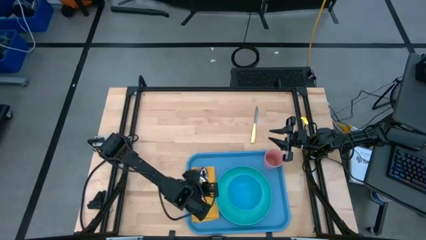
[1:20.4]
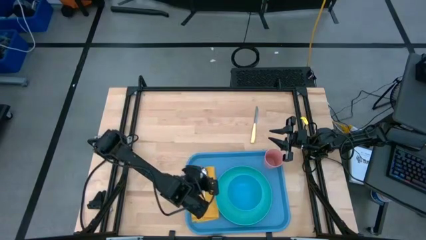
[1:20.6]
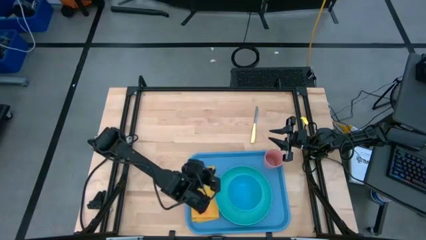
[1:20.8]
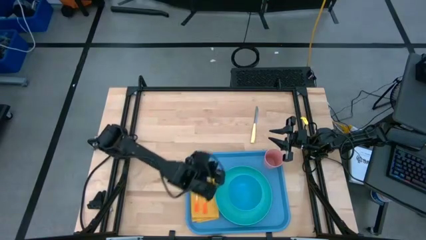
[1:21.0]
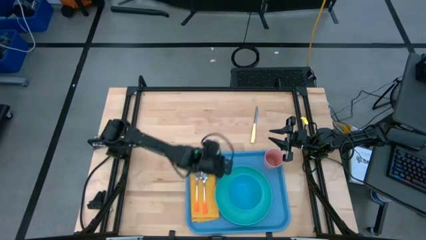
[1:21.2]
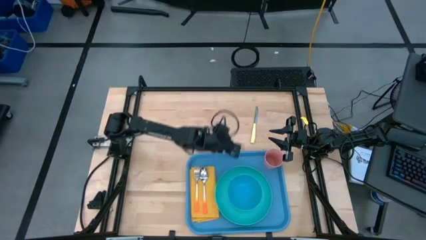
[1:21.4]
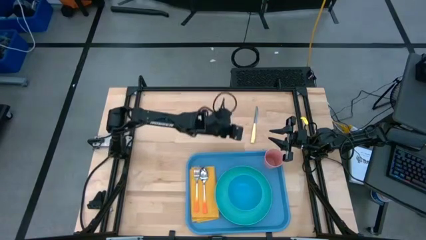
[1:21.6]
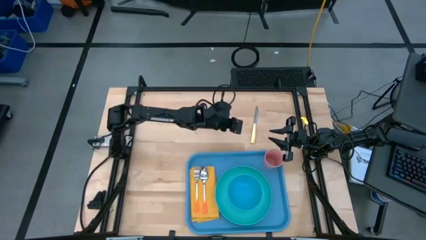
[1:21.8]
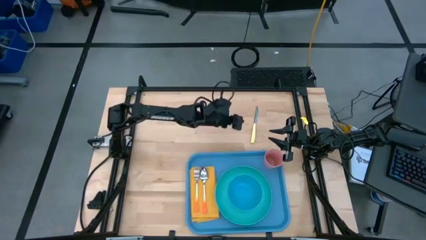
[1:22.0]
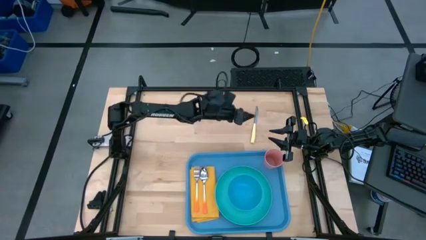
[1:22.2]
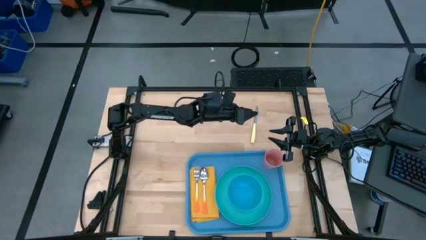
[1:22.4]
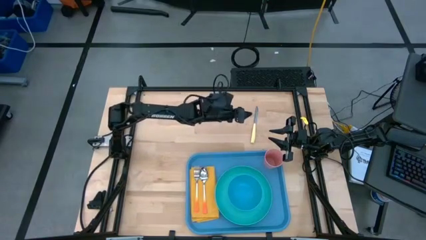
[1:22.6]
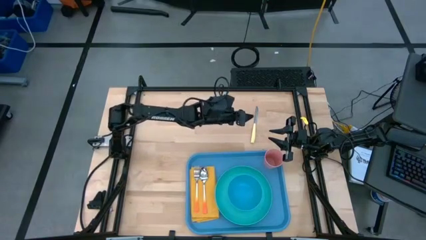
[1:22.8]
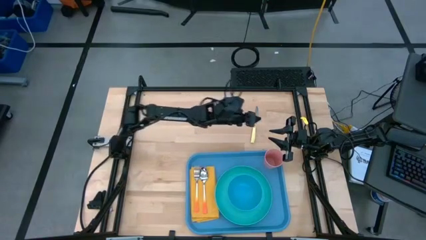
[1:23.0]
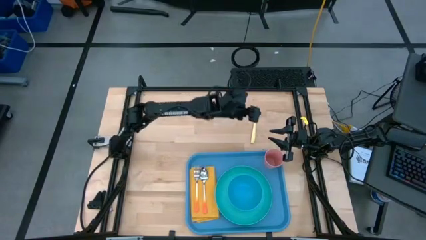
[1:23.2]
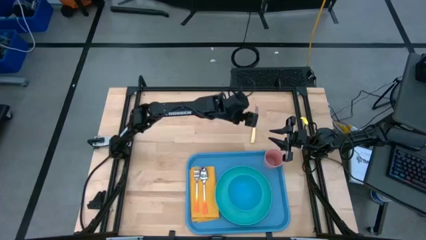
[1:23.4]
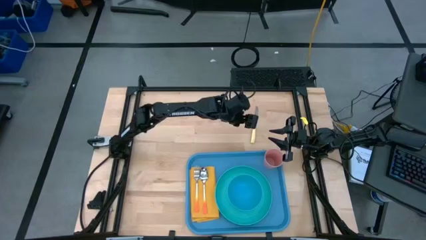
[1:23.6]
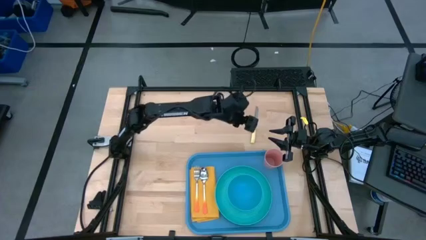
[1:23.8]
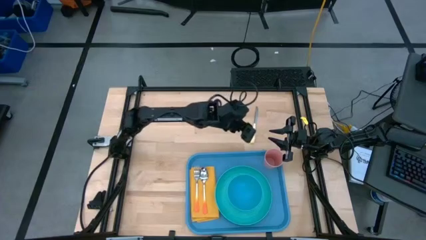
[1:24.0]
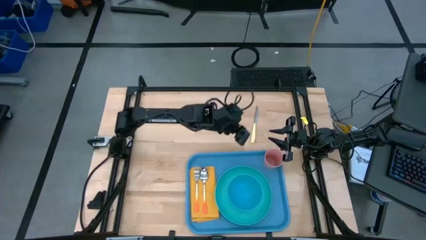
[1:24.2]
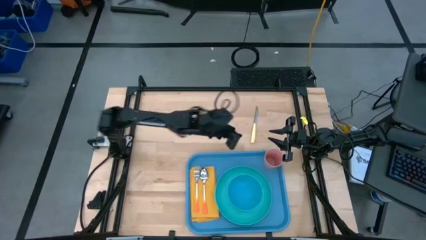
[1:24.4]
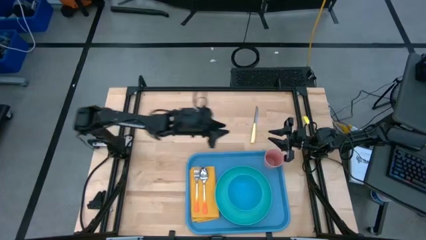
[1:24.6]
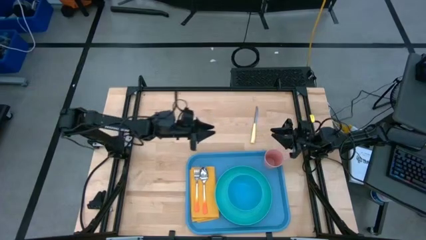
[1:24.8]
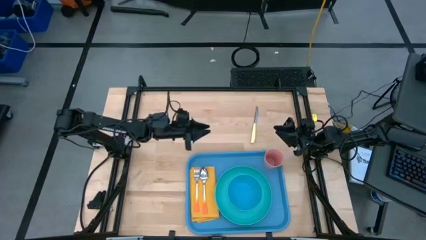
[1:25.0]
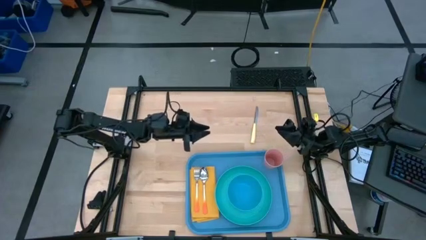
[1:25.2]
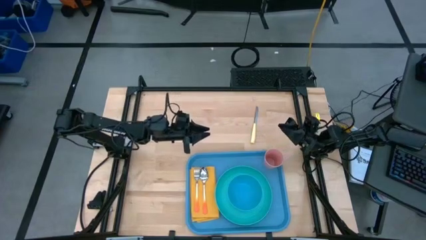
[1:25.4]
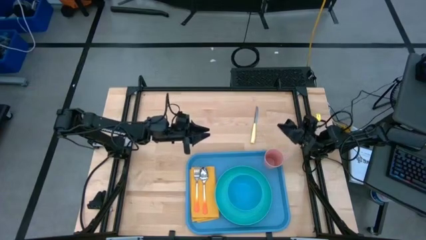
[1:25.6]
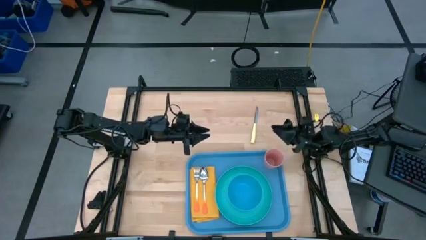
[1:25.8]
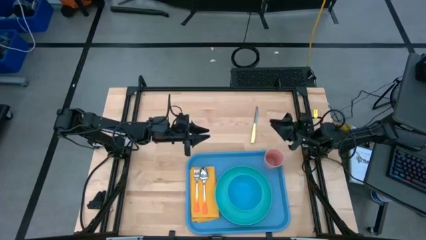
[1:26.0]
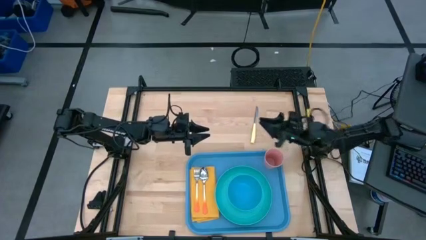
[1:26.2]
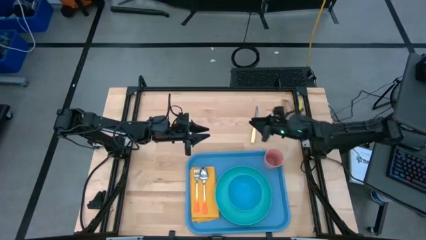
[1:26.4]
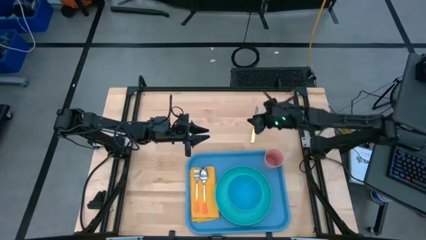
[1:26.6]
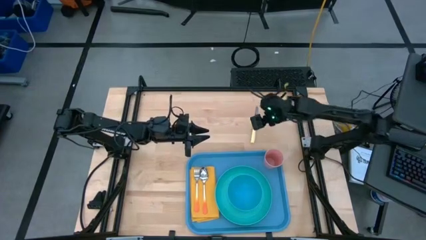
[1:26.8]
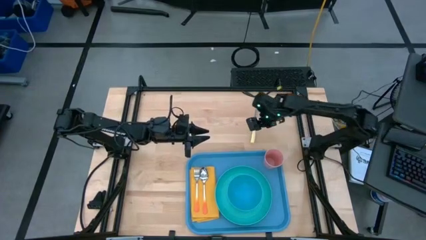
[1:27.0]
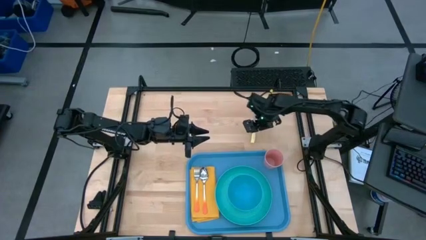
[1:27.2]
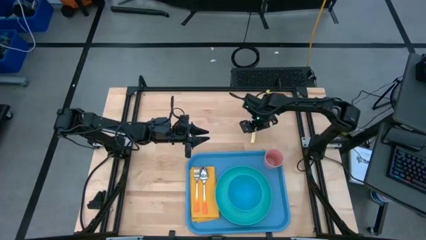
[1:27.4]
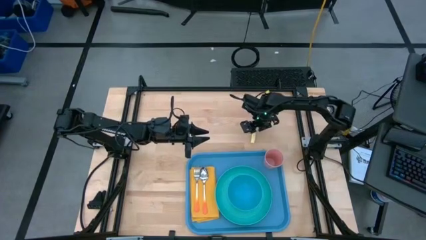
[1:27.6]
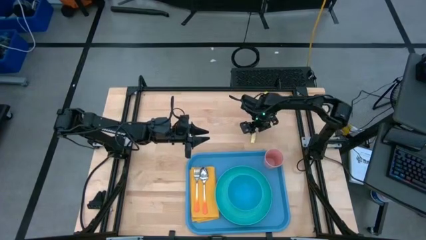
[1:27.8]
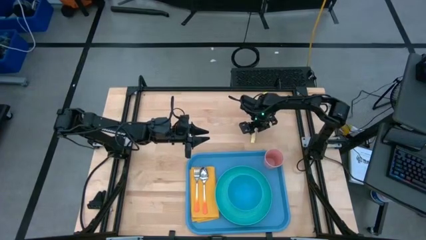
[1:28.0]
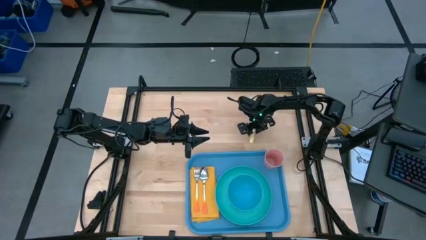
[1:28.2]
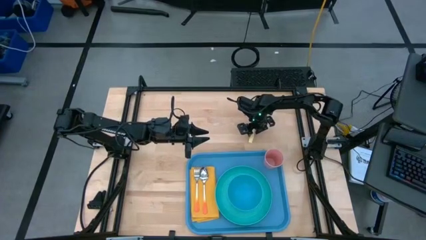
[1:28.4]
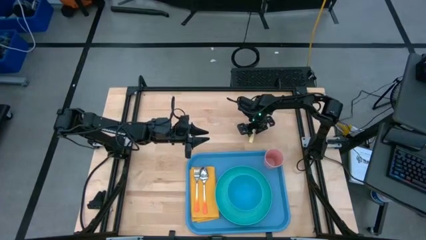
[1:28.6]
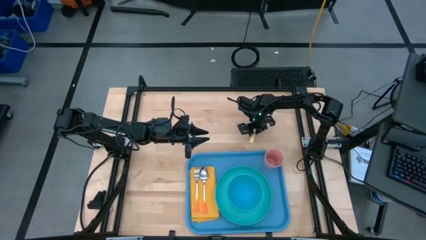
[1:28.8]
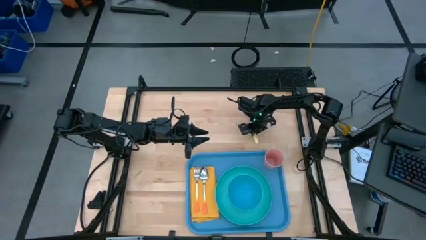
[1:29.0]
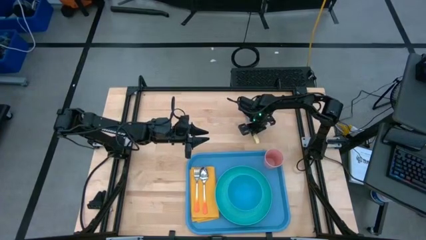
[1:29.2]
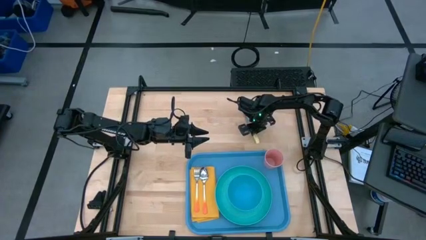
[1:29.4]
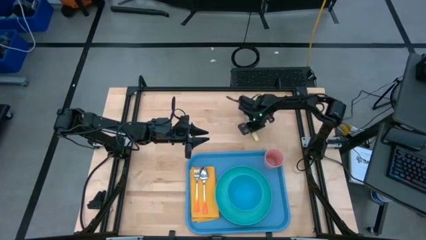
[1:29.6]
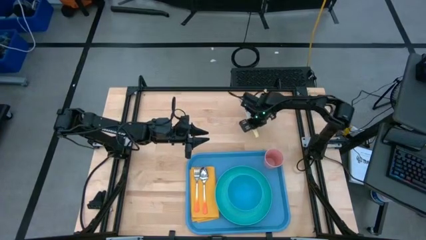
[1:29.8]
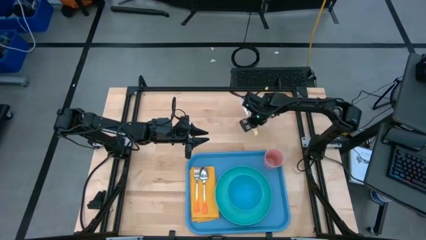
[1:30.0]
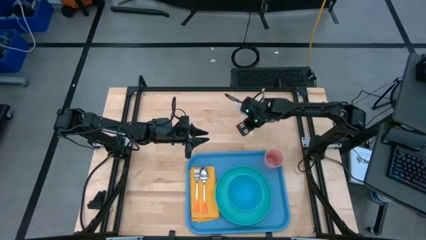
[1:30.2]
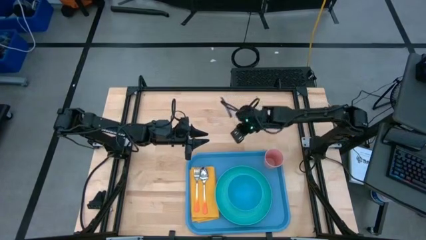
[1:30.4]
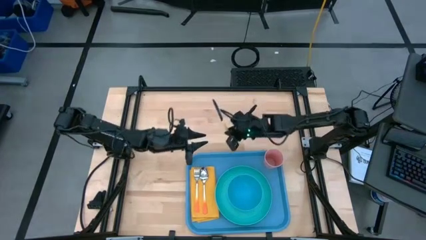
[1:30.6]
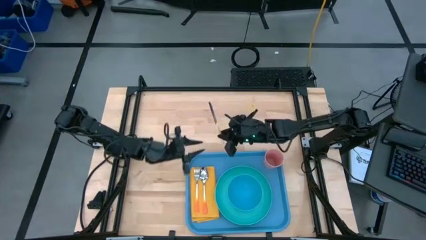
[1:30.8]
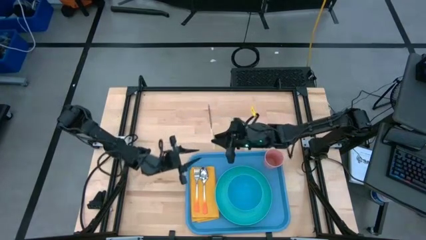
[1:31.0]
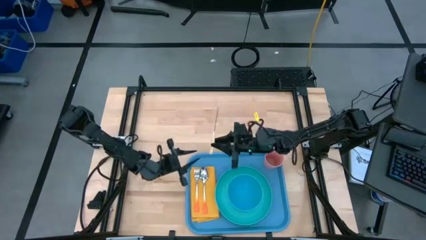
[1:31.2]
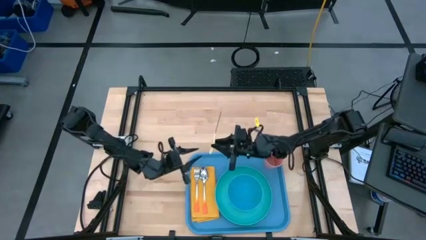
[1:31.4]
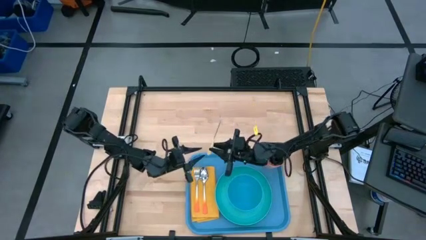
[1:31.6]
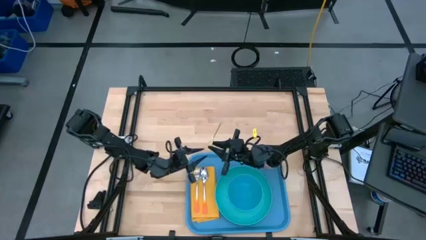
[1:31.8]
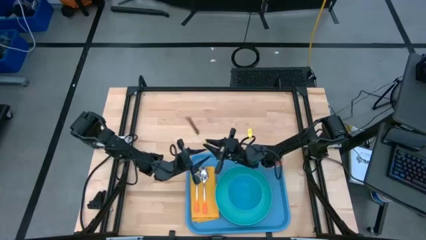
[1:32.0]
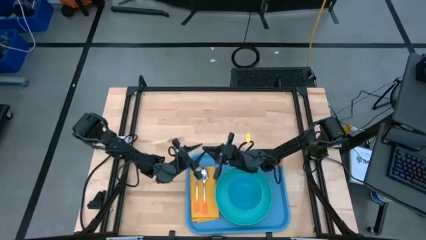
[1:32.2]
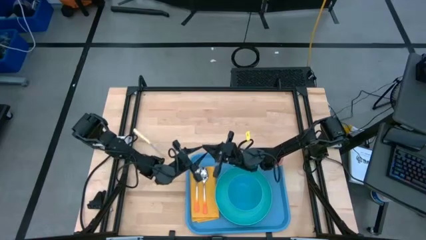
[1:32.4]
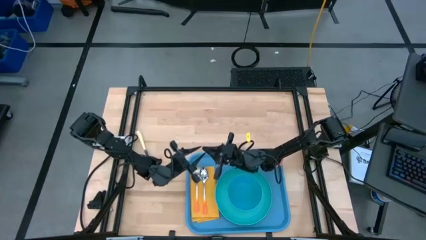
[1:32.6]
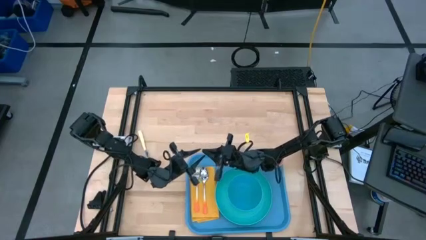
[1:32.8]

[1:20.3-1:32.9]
Task: Set up tray
Put the yellow table knife on the orange table napkin to the right of the orange spoon

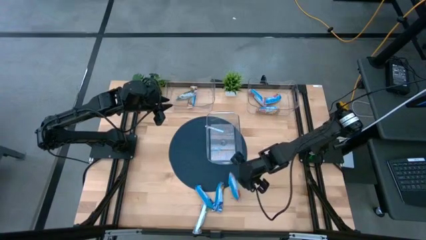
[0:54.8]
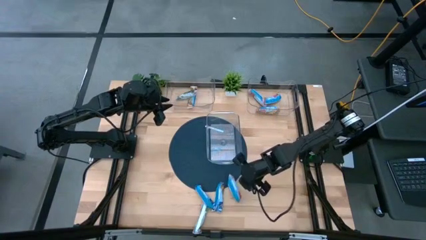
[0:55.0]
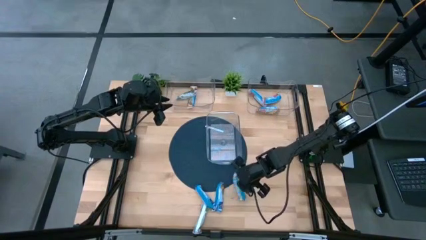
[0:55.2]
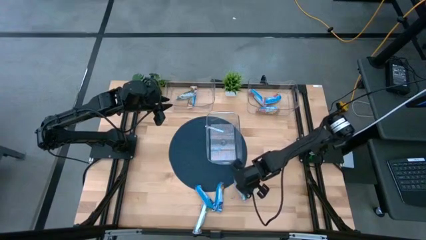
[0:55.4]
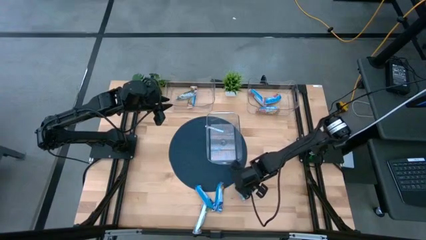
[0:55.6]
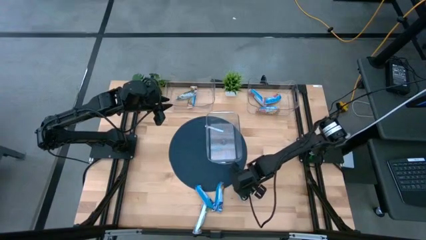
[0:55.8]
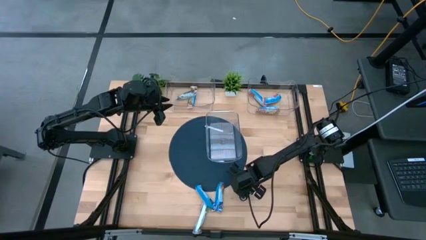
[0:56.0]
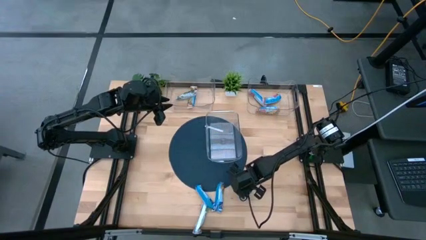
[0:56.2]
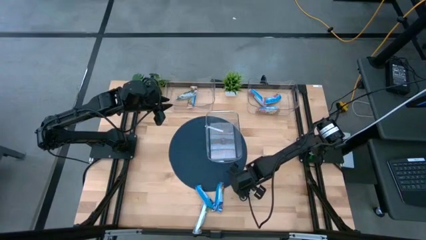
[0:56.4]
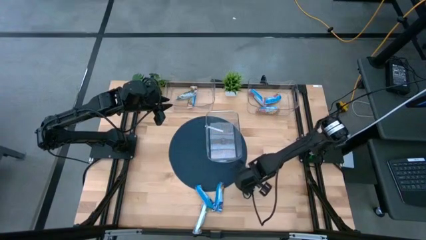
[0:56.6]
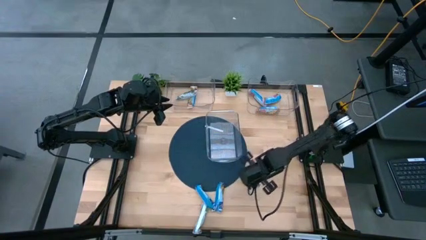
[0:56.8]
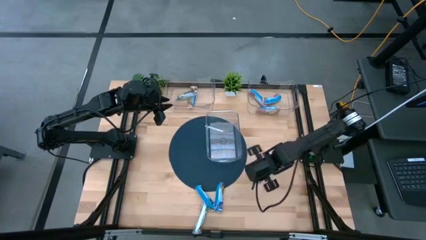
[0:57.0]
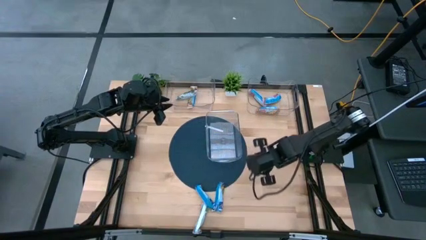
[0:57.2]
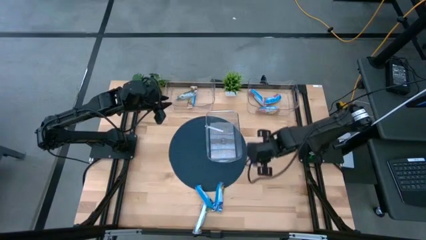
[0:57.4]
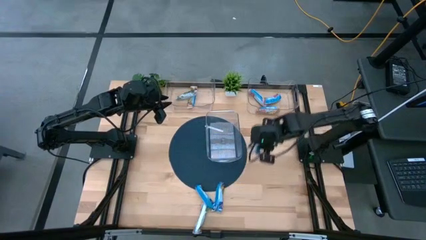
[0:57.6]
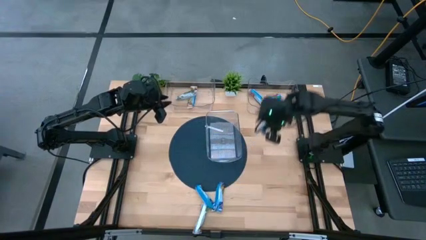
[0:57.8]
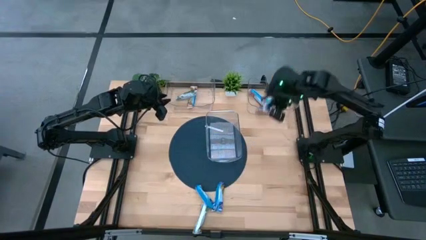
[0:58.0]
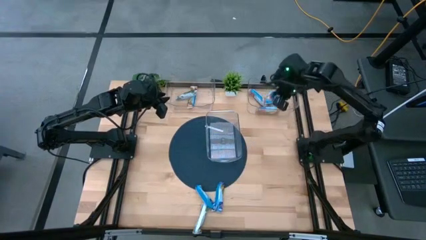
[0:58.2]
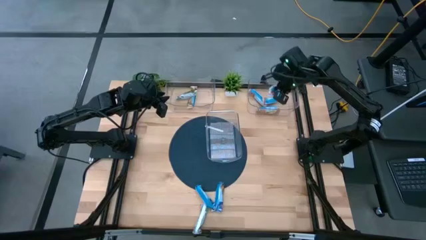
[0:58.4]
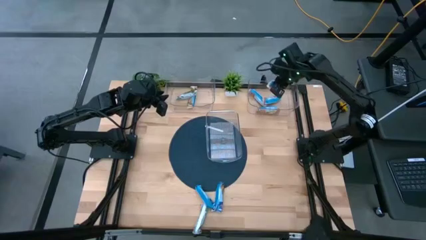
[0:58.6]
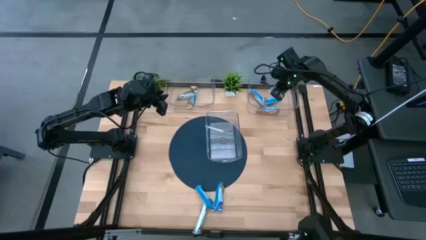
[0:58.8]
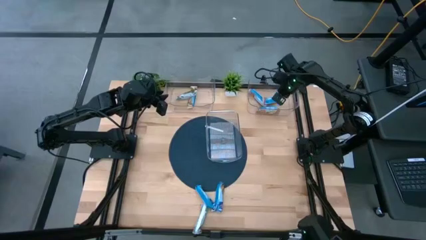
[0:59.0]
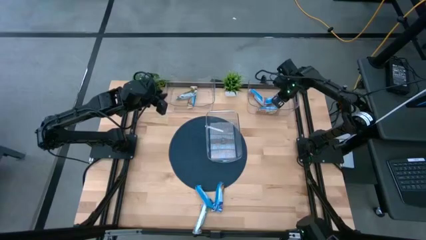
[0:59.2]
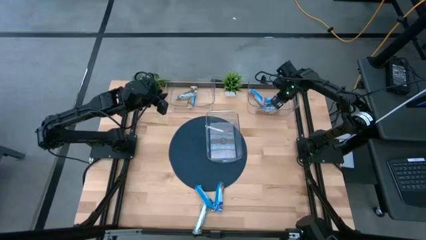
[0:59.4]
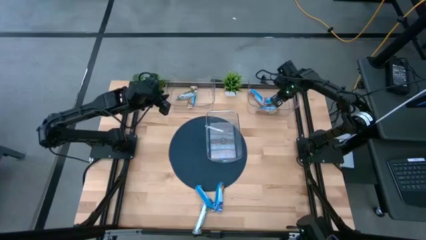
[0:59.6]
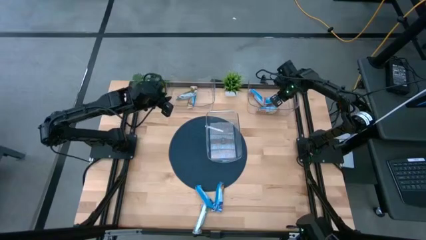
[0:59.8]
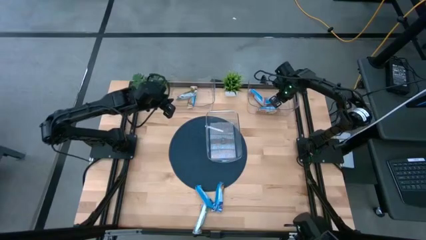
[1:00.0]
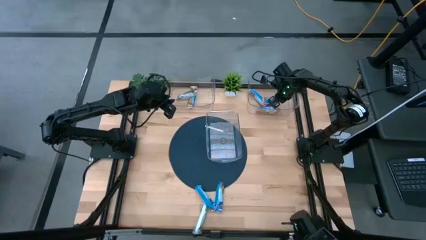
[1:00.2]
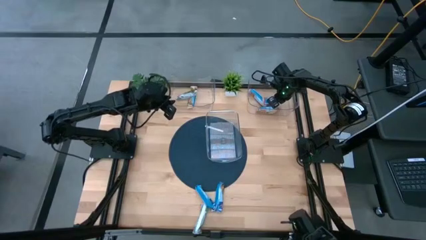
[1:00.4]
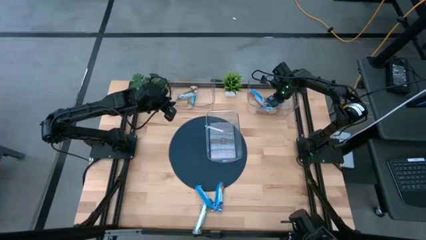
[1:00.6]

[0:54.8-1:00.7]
Task: Pick and place Granola Bars by type
Put the red granola bar into the top right transparent bin
